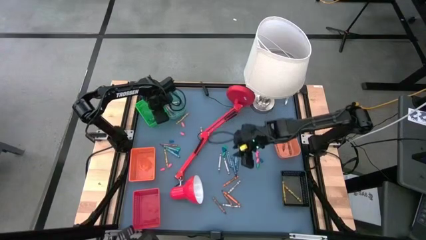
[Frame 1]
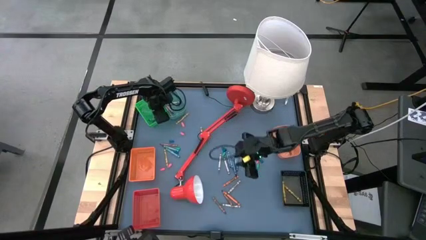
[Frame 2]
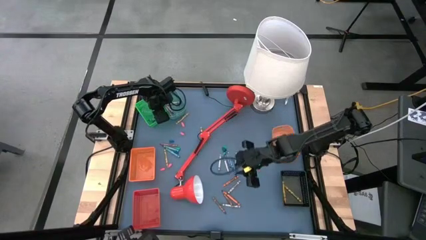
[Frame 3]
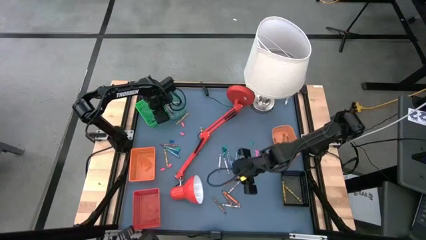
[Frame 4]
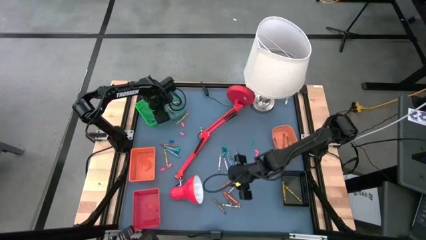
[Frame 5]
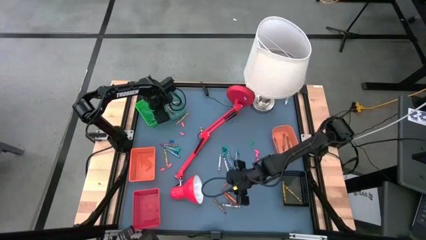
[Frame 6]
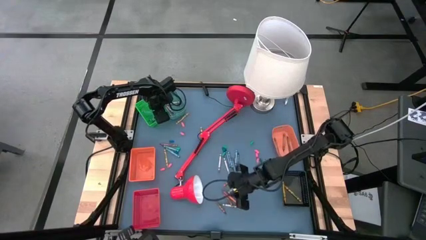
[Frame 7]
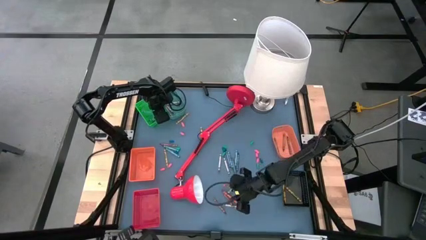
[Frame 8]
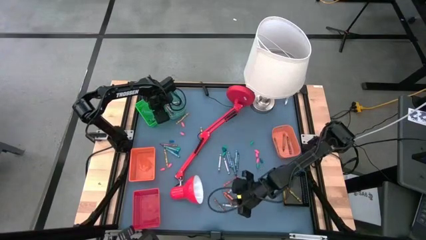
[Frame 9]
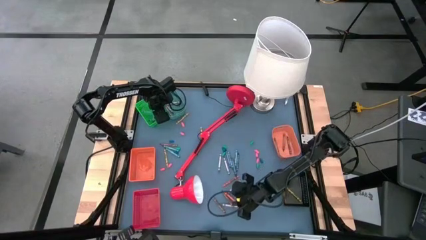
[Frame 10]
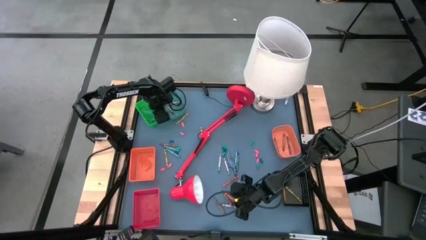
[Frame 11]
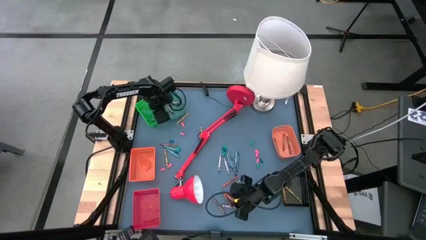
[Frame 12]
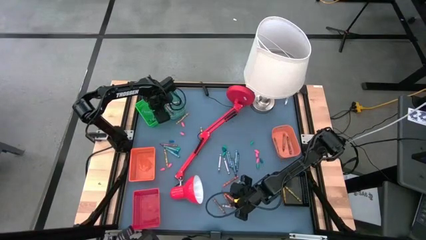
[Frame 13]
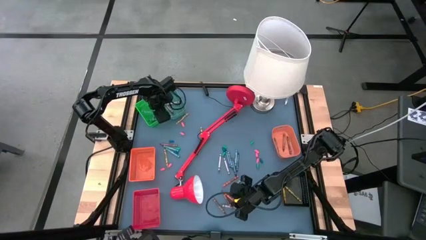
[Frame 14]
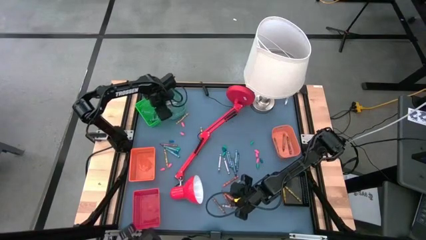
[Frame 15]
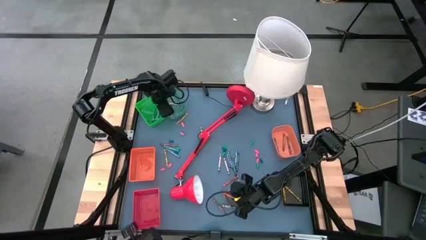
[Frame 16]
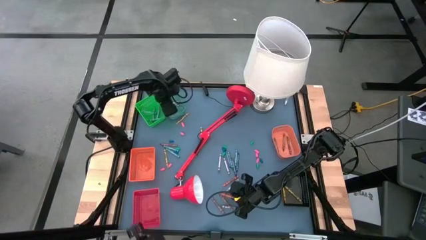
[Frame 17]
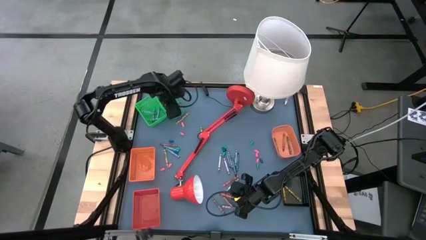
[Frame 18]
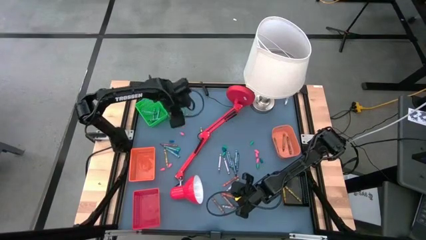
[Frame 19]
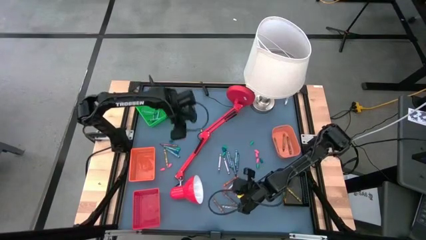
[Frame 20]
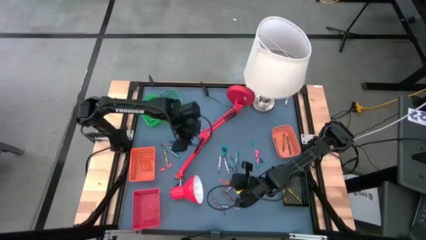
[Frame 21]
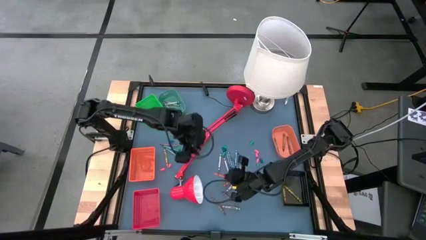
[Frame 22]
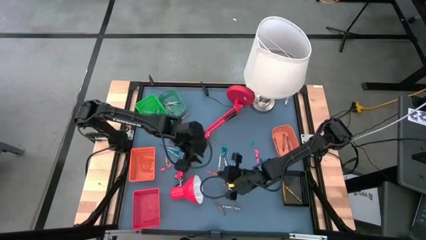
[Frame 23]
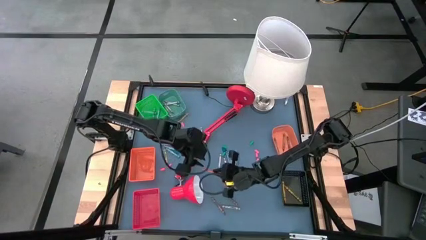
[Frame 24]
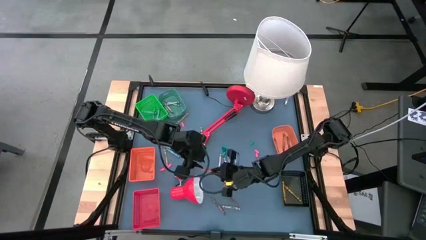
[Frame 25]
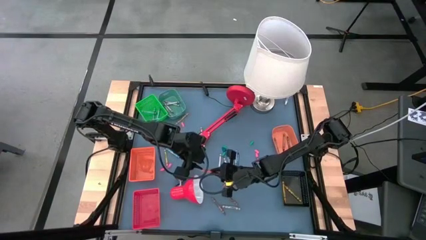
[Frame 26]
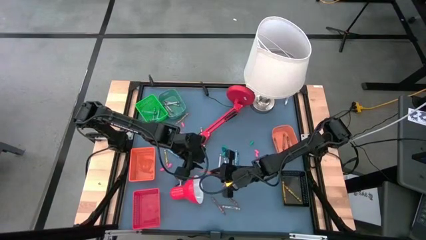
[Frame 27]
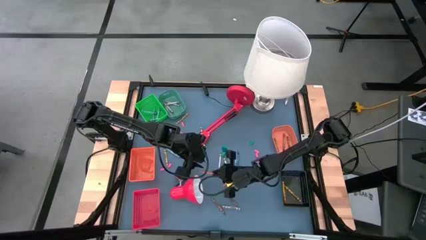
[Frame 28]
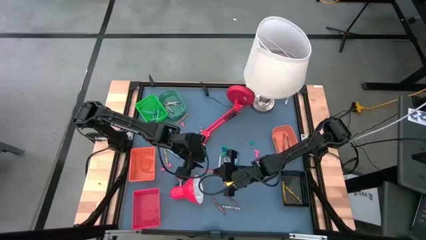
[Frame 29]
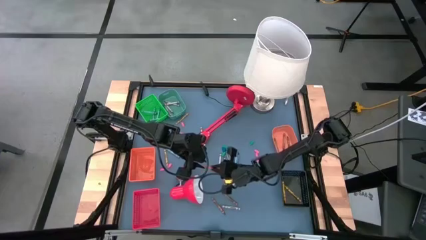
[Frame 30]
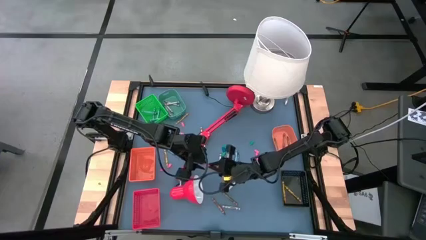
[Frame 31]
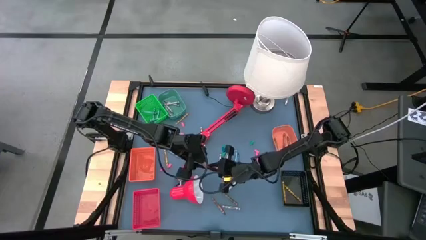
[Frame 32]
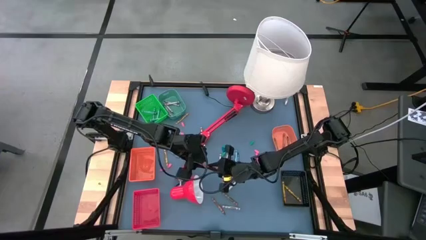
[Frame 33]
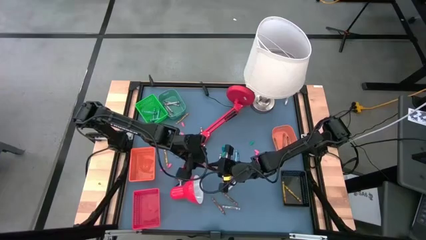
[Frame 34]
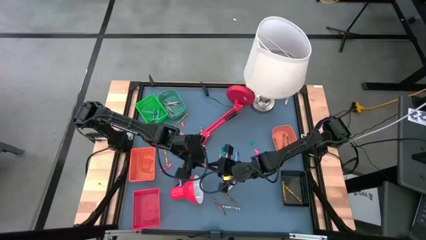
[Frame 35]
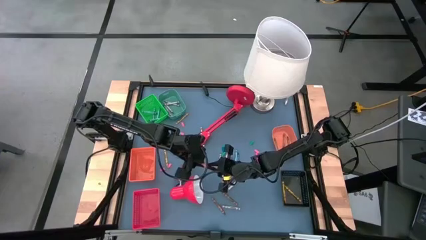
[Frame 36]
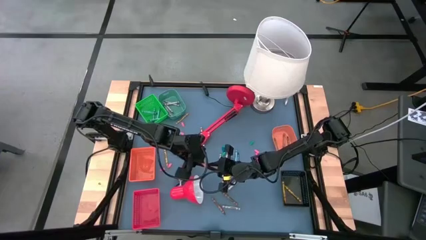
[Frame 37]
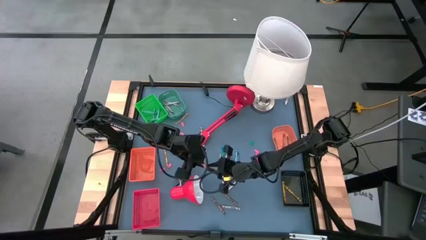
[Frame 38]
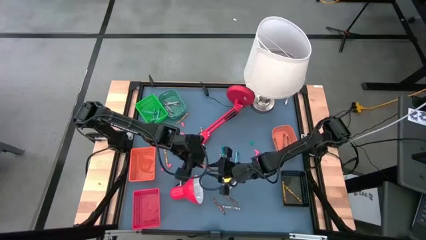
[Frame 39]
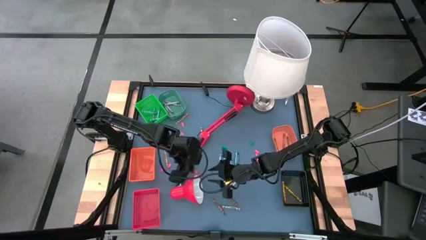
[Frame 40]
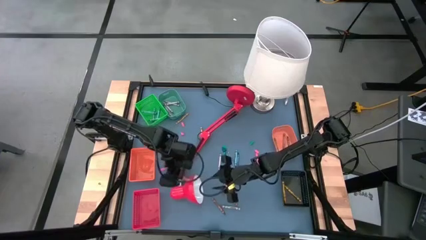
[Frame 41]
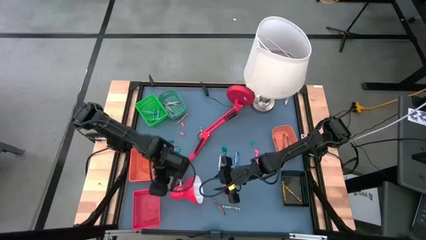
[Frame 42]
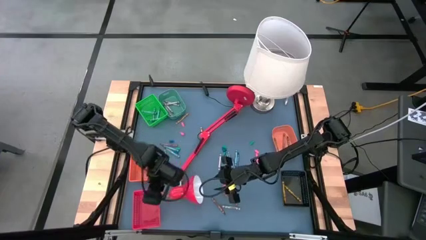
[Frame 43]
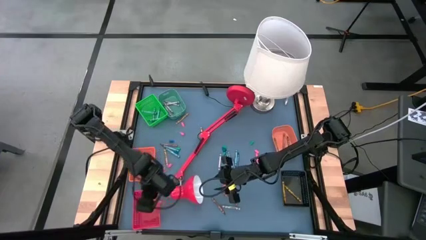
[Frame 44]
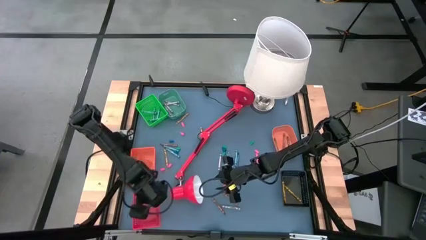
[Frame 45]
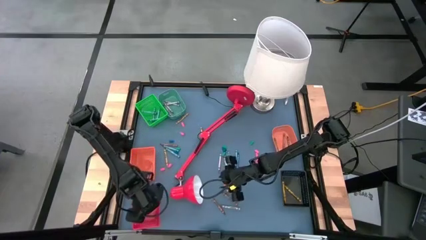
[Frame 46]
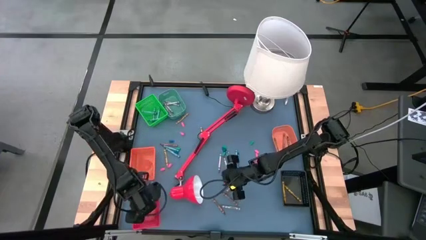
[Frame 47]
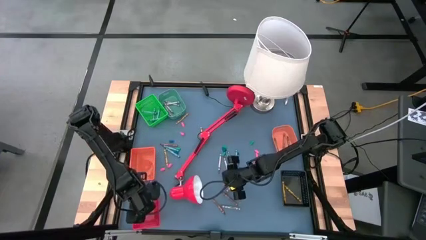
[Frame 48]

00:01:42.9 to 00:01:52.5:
Task: Sort crayons
Put the bottom orange crayon into the red bin

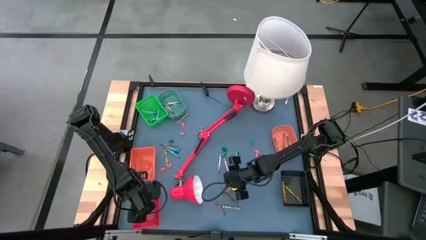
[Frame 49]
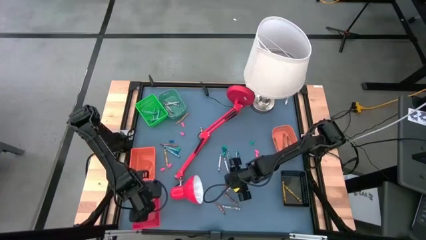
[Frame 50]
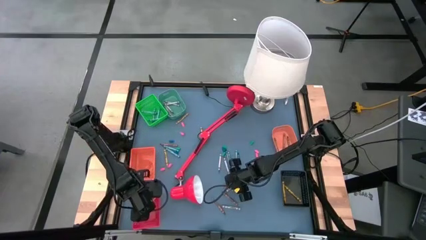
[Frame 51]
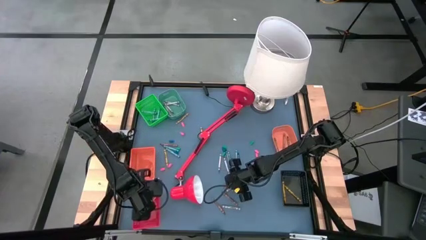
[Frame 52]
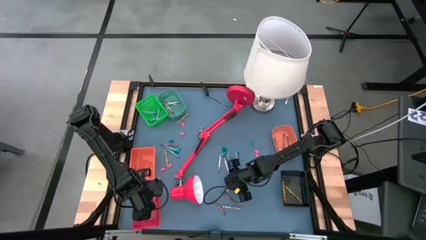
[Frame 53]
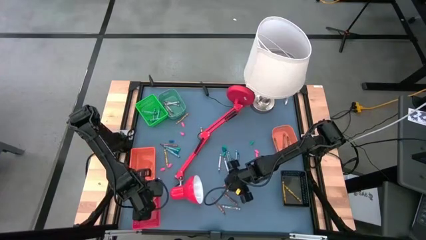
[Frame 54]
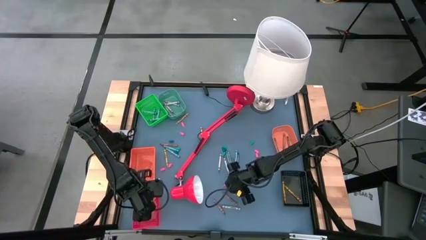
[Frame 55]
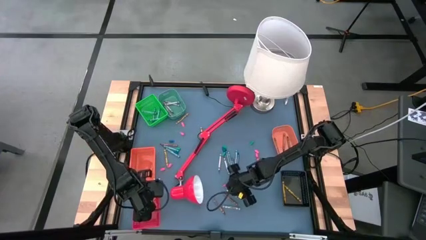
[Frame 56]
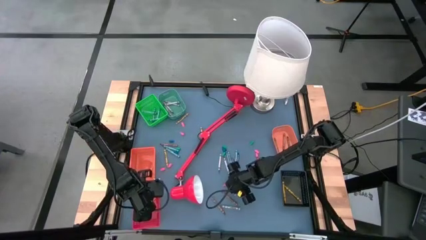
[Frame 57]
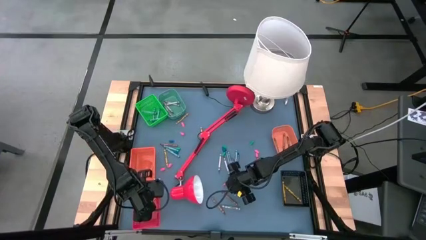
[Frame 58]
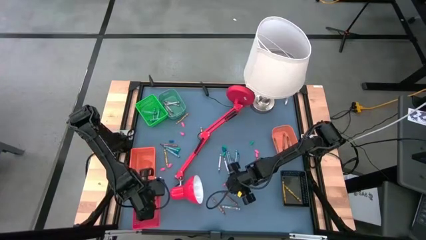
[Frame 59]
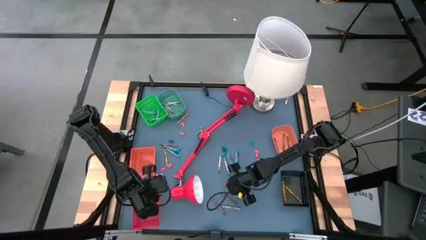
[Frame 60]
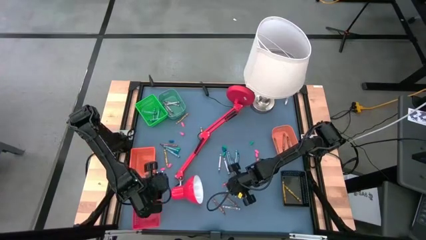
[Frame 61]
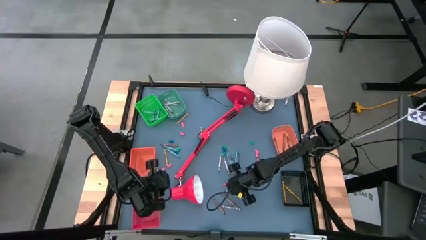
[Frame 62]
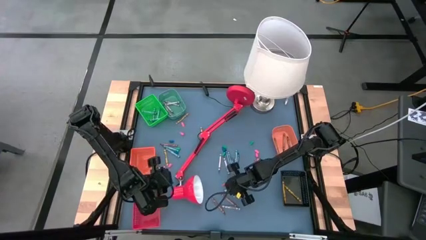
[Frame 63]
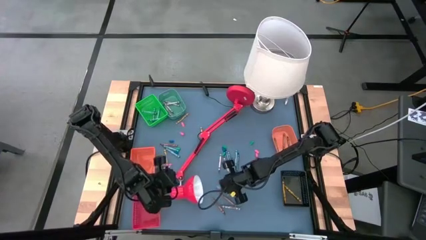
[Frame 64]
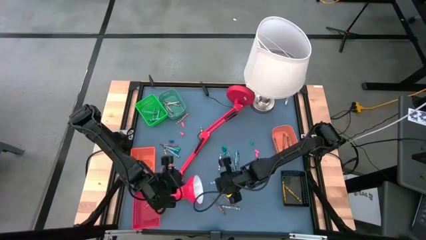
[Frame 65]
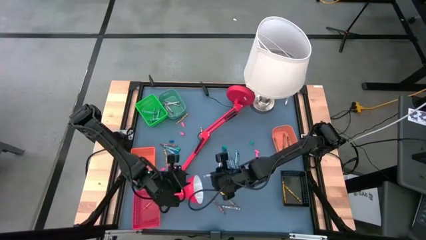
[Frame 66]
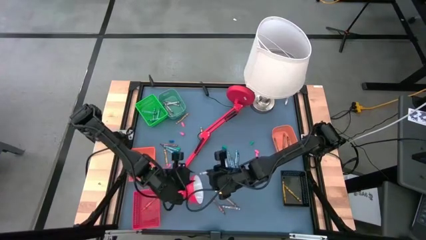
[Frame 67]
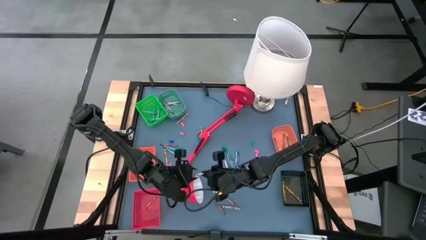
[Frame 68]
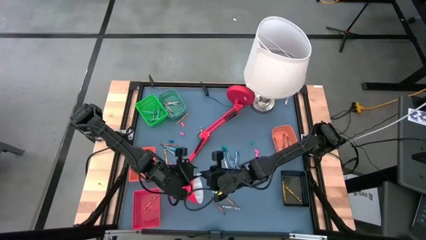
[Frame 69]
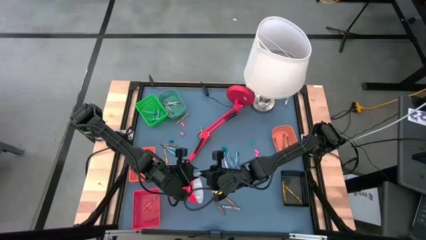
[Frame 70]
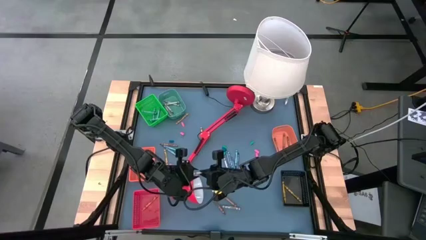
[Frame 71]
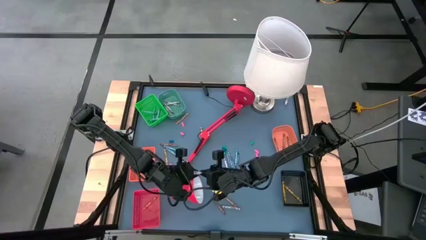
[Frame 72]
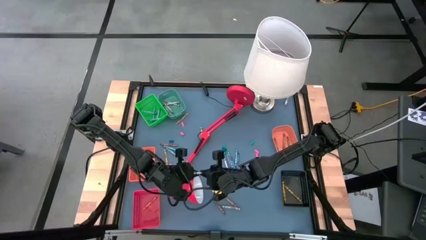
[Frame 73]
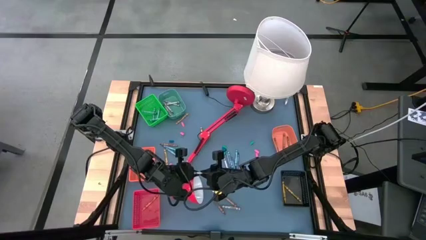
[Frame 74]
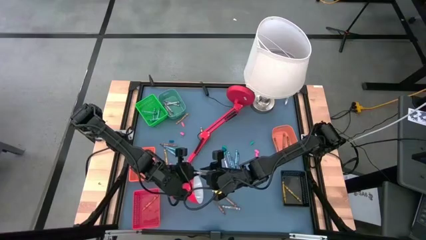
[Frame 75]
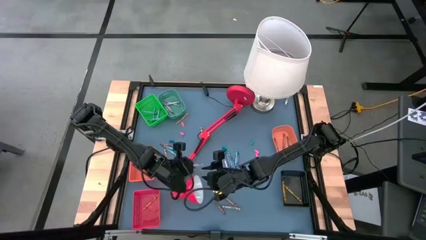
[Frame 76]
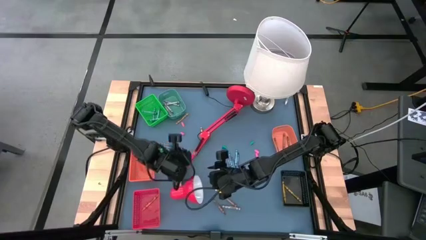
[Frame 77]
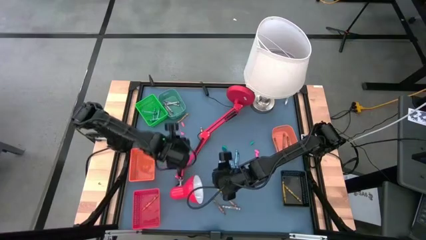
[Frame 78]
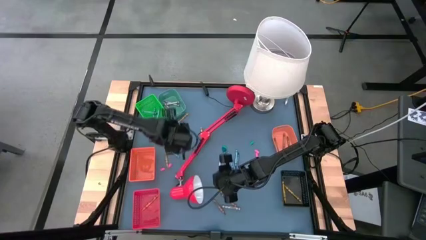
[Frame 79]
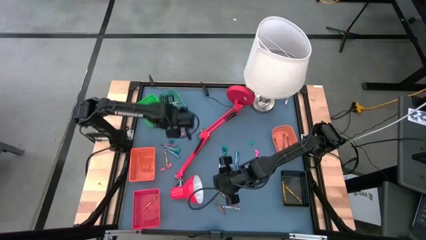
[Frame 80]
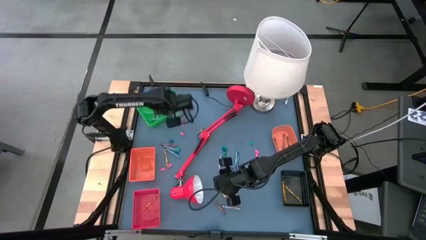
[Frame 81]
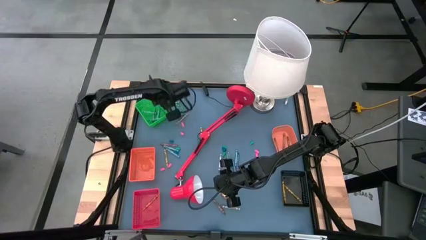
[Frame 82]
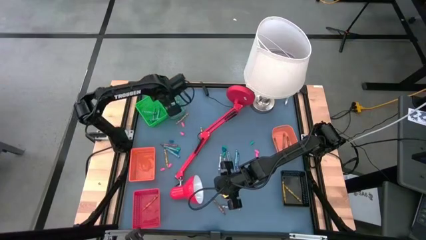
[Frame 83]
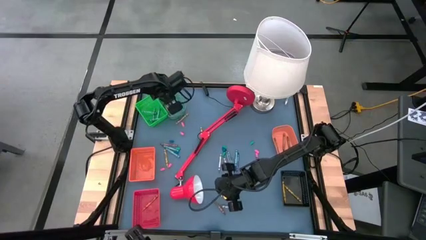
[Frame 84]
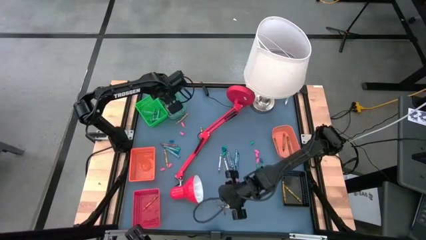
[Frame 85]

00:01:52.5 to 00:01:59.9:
Put the gray crayon into the blue bin
